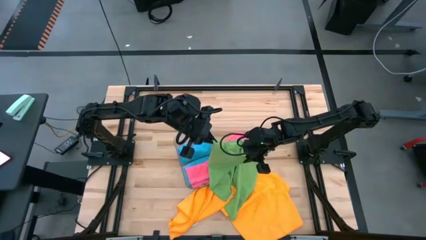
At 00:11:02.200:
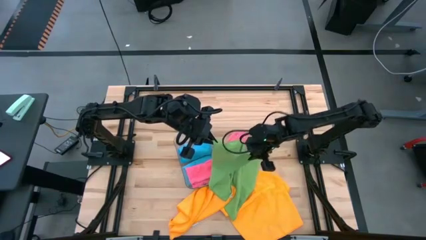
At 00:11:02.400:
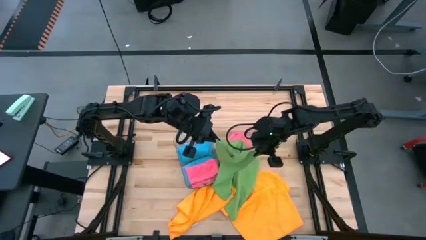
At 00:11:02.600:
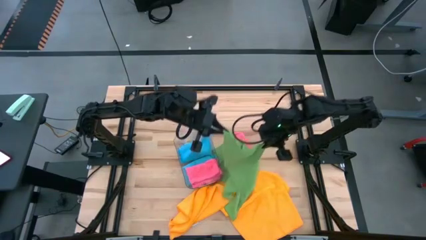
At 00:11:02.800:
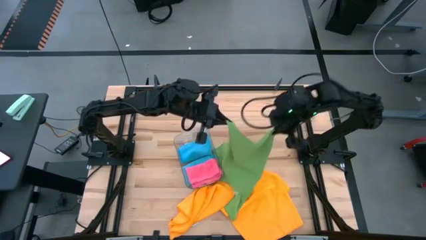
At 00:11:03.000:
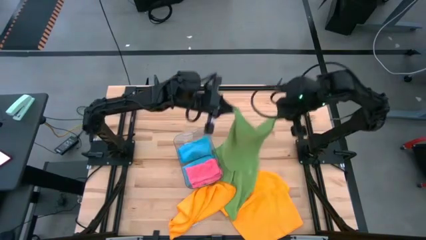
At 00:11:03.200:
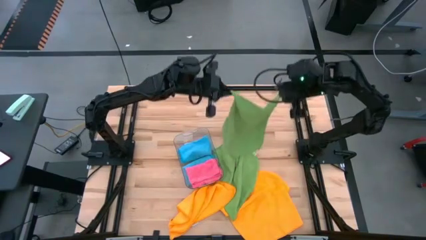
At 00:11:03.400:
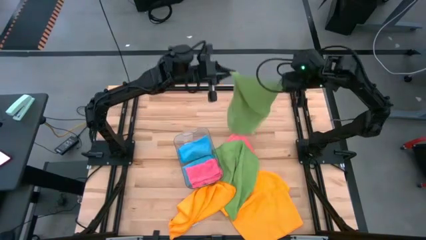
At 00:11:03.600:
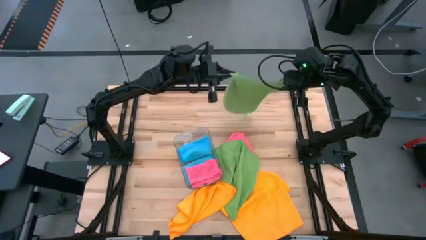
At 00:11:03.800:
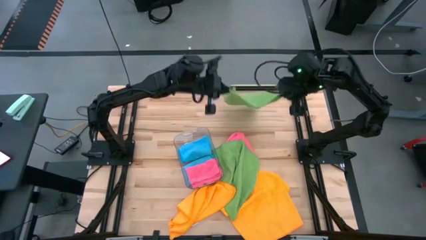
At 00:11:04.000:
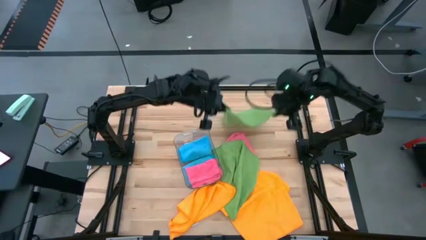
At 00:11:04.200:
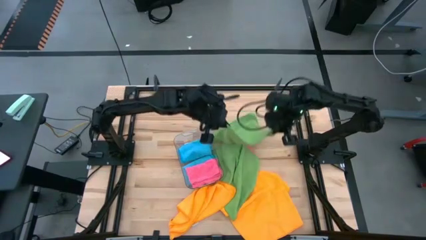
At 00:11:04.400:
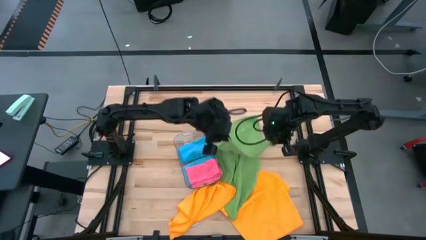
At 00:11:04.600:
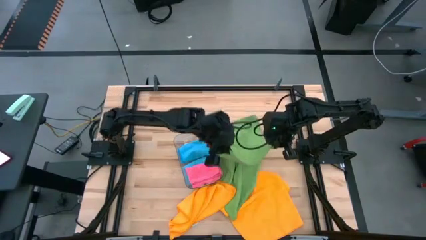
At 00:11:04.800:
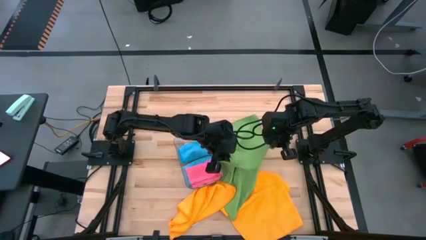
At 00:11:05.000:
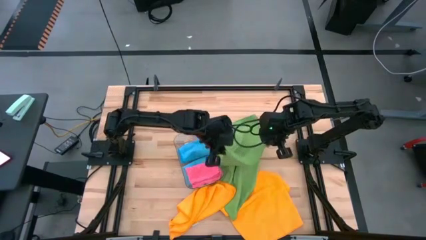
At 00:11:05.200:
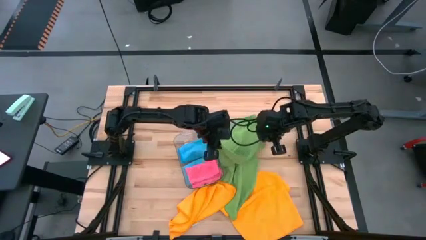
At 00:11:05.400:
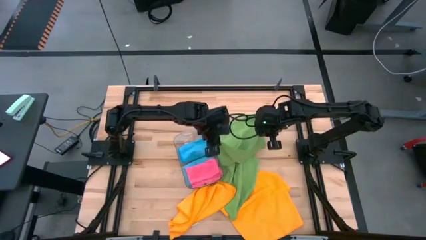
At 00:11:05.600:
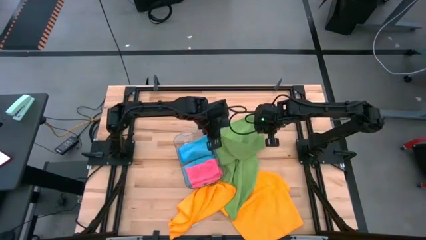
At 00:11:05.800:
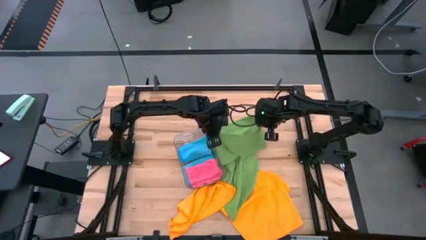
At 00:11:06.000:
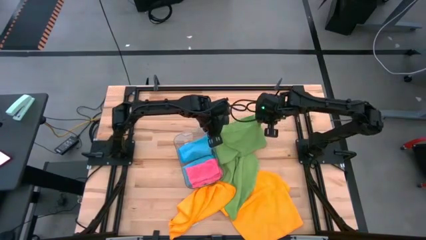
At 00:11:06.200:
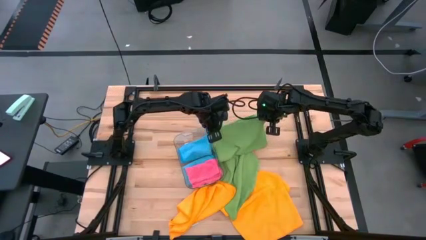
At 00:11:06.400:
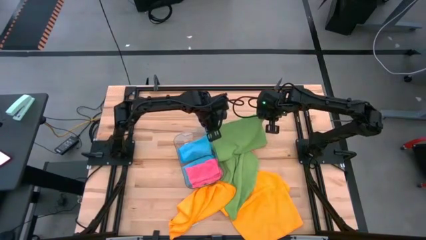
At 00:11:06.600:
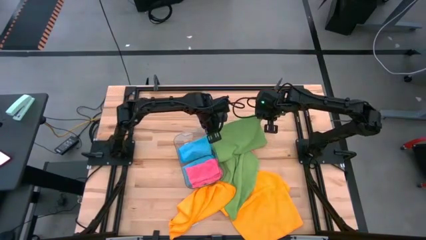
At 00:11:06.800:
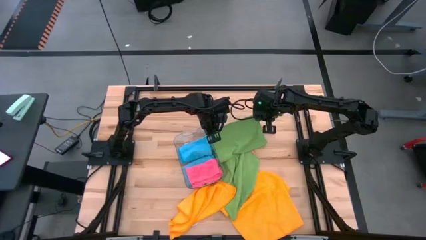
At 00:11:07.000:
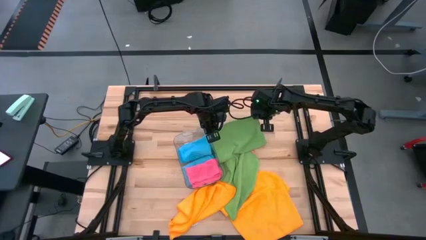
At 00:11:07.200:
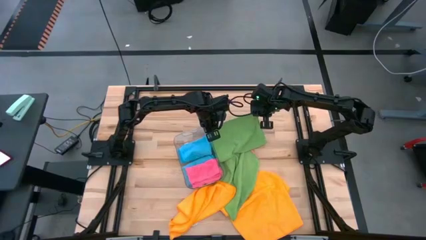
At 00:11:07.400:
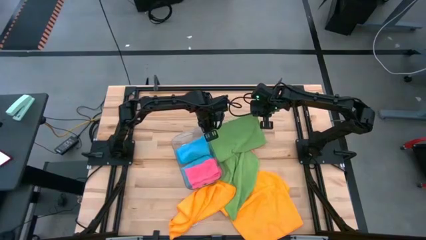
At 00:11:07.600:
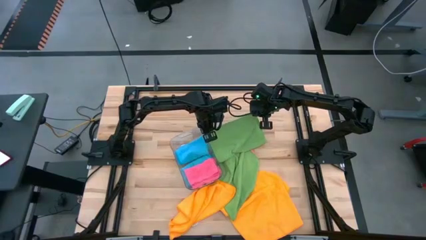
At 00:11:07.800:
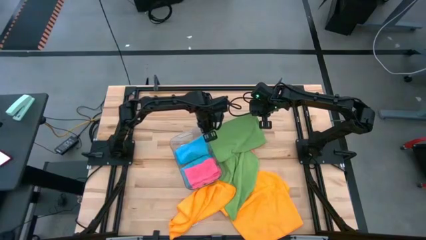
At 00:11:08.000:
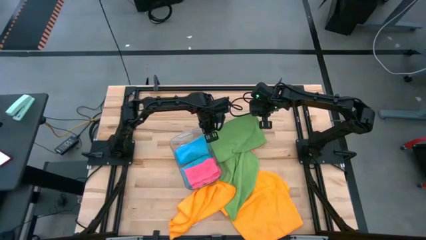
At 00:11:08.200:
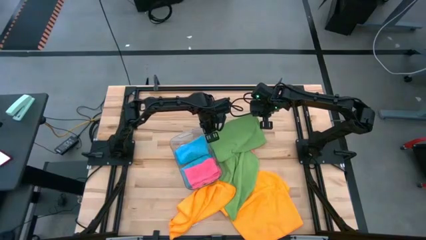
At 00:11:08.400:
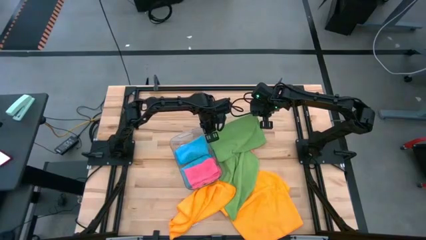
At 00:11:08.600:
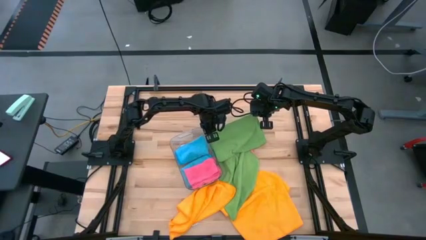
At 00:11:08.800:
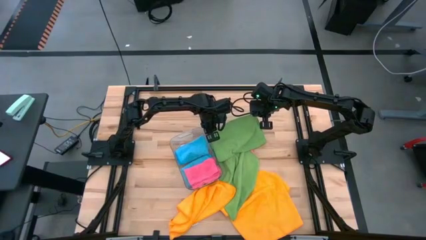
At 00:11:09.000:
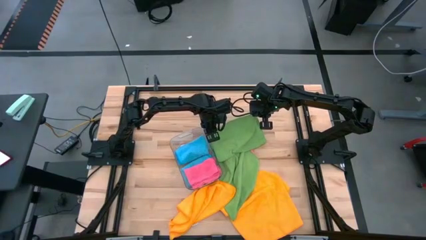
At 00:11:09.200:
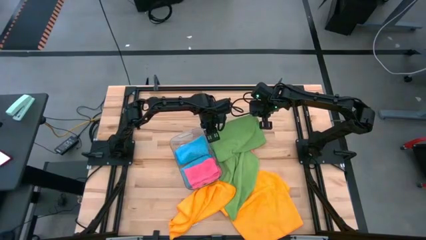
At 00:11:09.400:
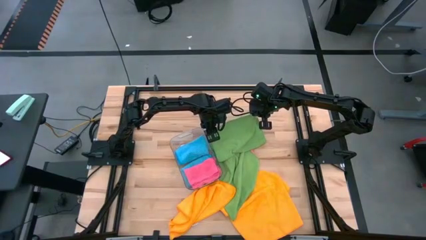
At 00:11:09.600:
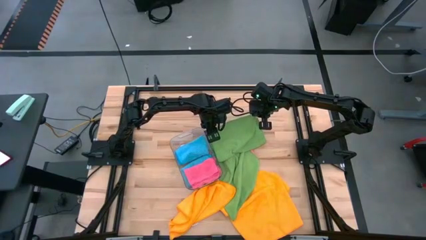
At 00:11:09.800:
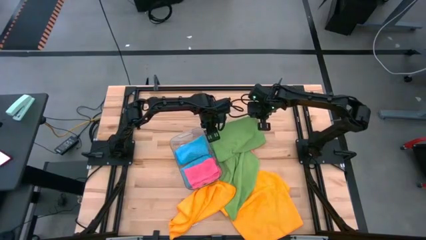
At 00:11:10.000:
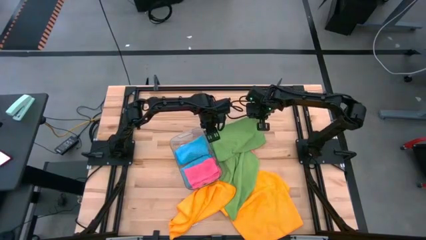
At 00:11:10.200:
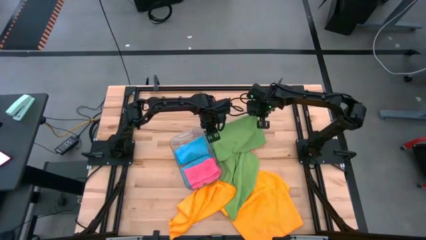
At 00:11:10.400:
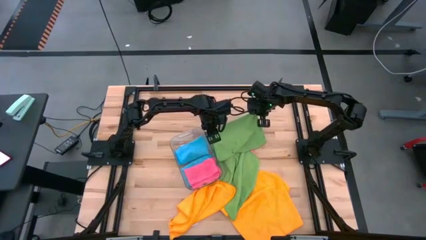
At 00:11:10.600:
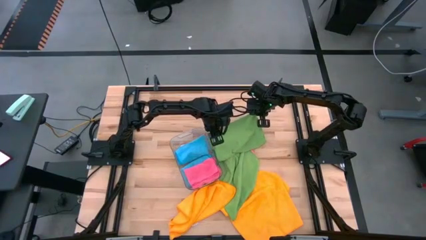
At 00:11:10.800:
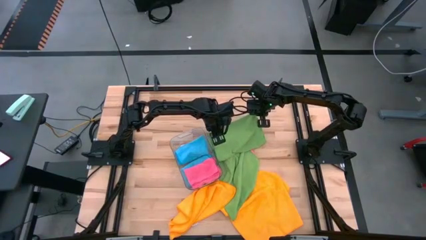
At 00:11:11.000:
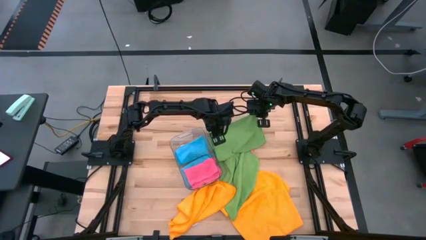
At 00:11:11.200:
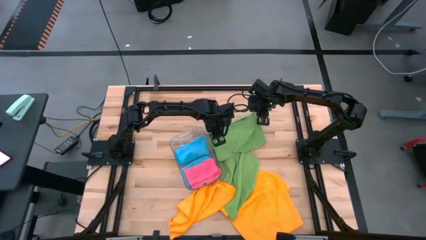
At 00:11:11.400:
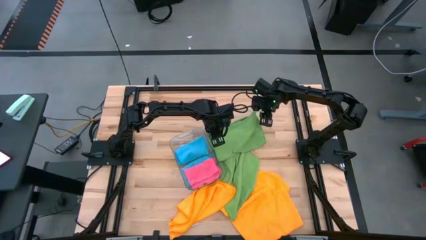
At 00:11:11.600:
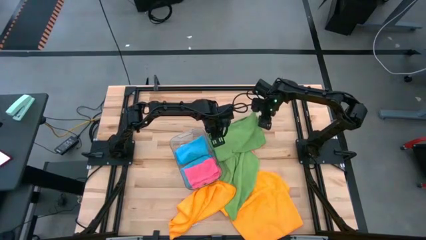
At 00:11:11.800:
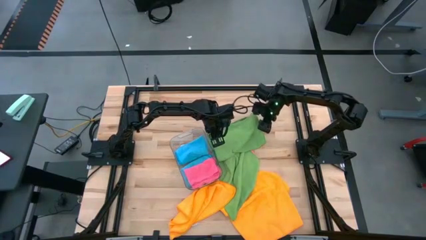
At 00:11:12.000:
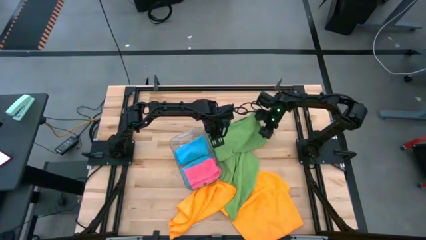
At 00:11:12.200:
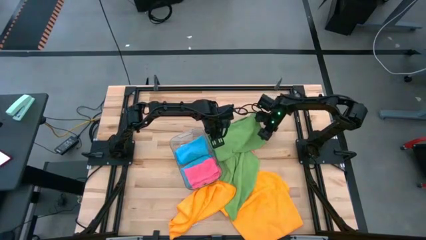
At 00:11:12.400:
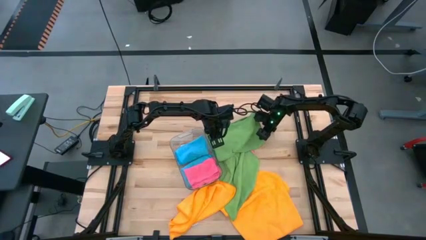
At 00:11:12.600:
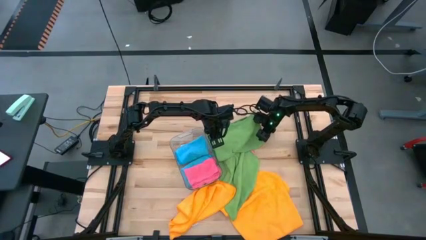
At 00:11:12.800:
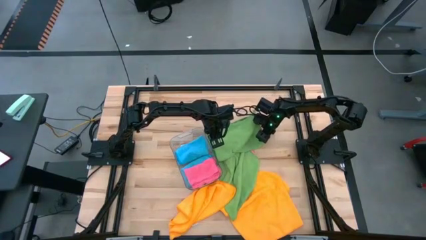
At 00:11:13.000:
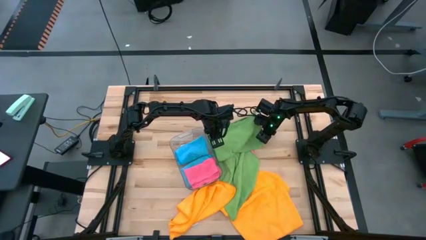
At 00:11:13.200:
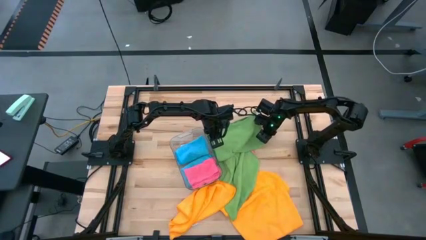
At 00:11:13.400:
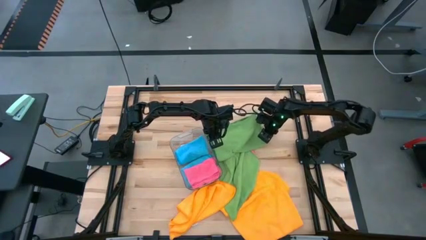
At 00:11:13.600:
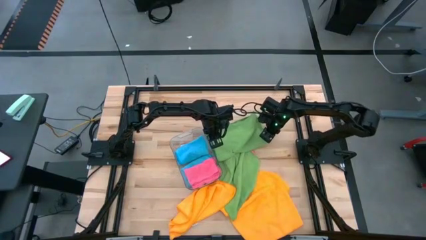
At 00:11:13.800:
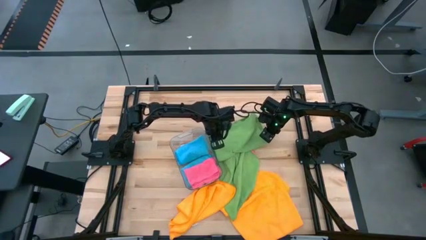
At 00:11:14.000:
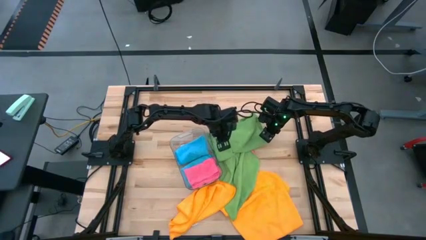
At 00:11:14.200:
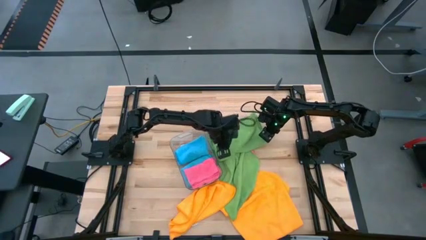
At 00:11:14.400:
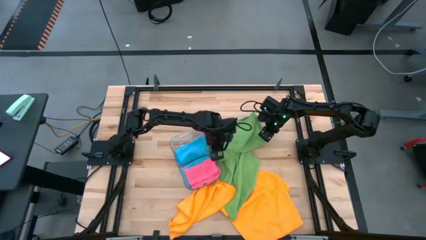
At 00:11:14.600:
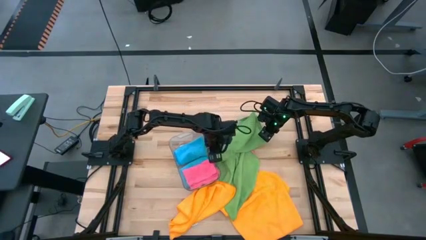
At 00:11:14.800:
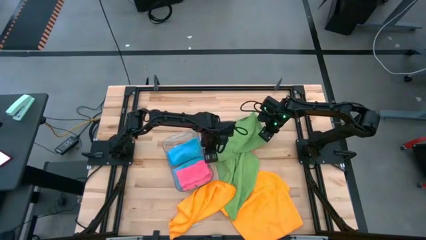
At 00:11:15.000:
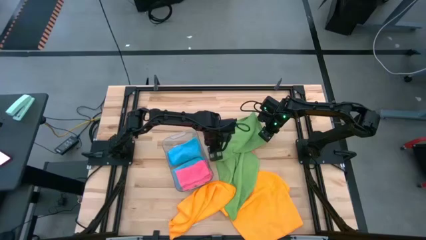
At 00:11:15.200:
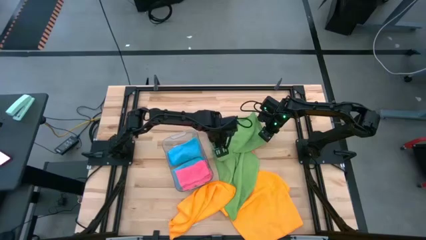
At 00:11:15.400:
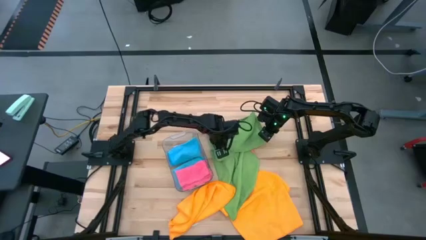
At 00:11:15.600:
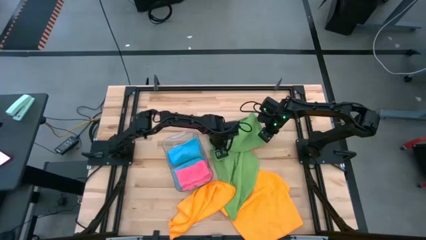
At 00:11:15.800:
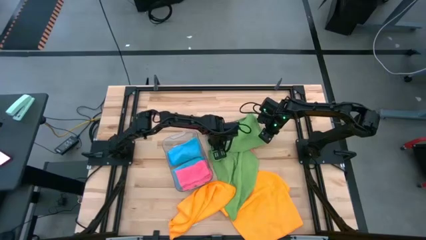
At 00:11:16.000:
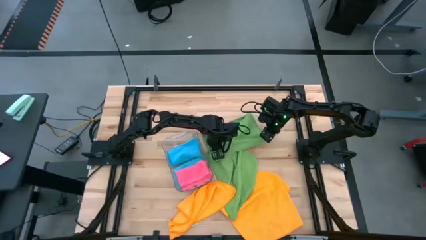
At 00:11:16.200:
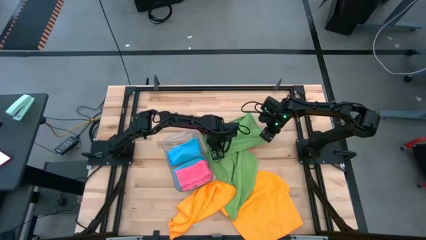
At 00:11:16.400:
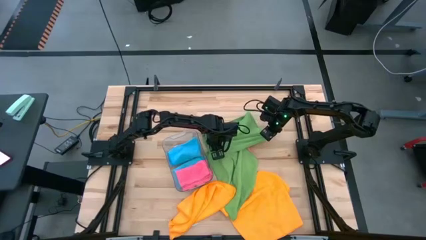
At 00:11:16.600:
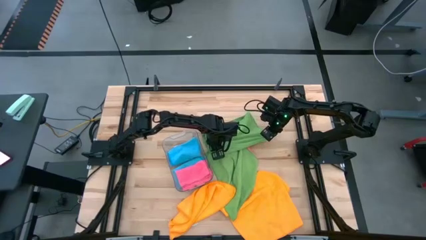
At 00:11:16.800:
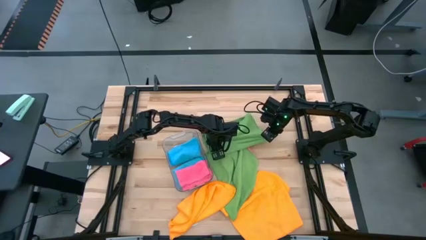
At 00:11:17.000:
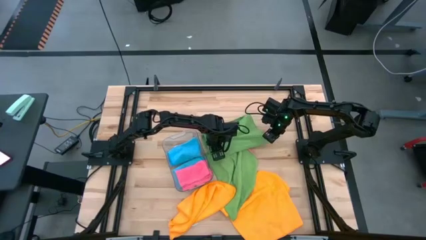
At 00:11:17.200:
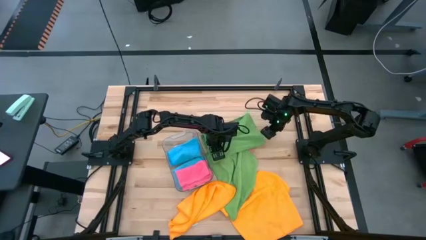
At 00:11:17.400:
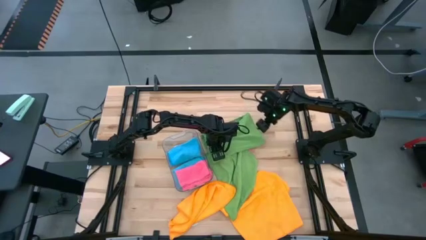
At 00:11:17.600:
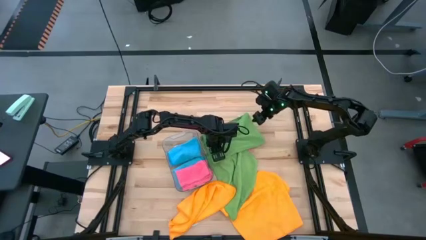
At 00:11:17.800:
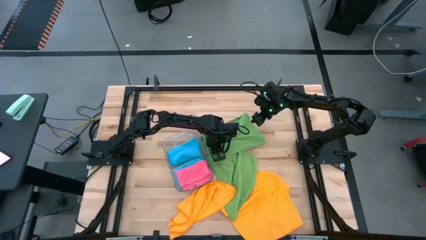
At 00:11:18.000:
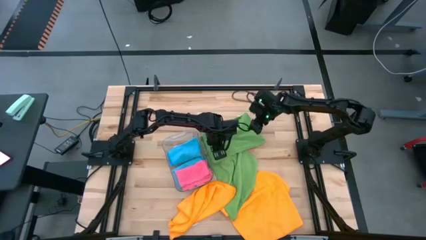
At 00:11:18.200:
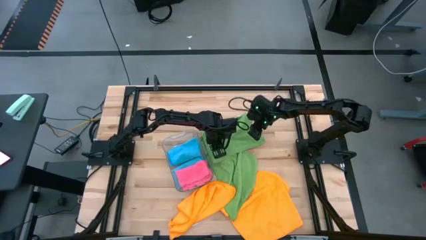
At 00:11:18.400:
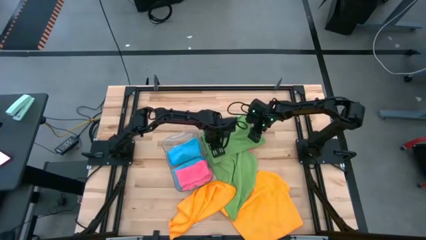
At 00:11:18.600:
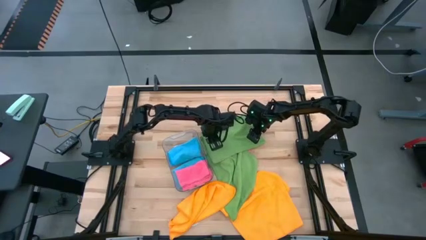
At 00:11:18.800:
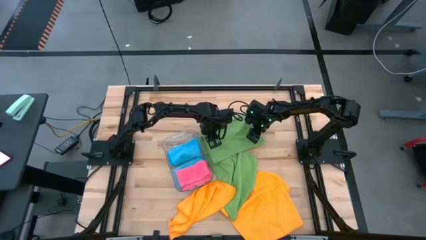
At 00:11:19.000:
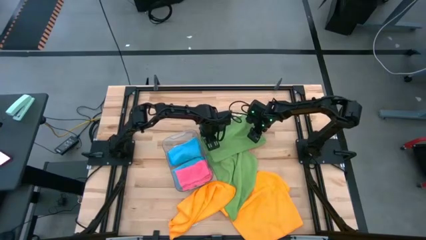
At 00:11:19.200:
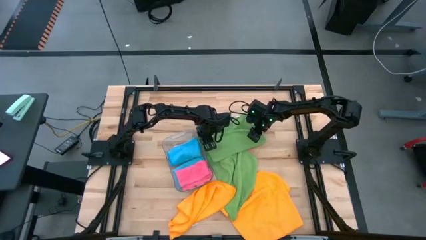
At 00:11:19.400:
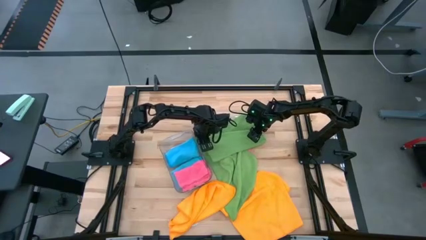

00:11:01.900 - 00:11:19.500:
Task: Fold microfiber towels
Fold the top green towel
